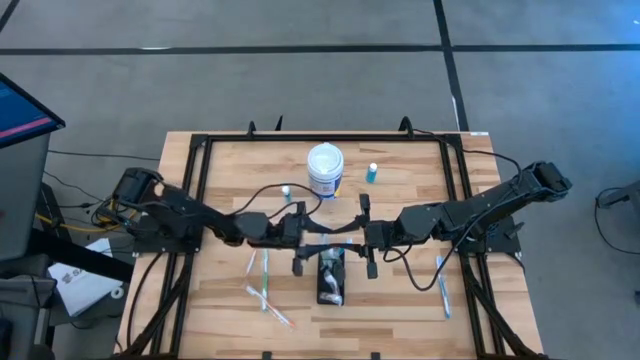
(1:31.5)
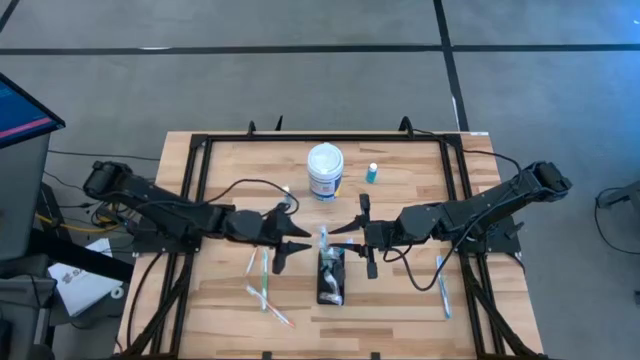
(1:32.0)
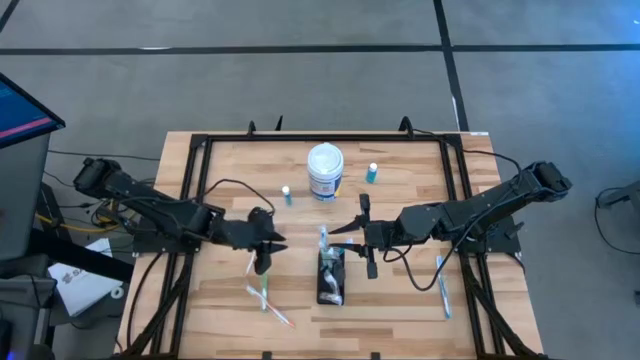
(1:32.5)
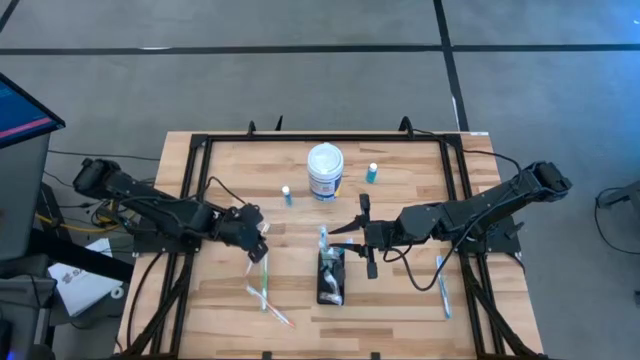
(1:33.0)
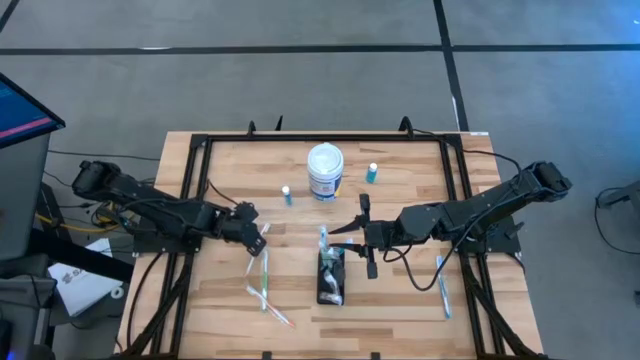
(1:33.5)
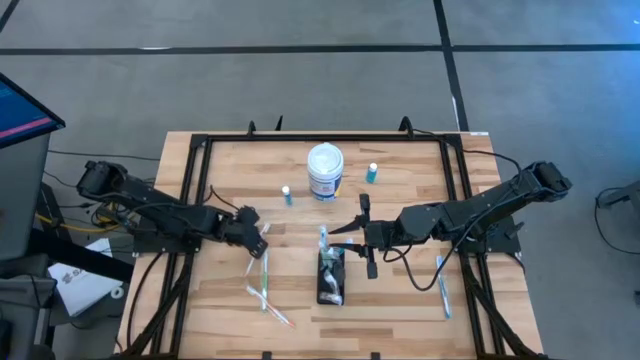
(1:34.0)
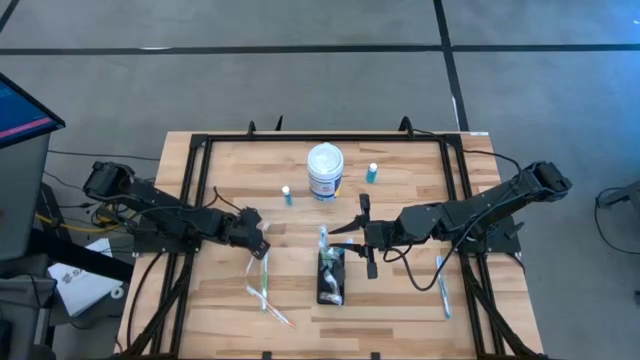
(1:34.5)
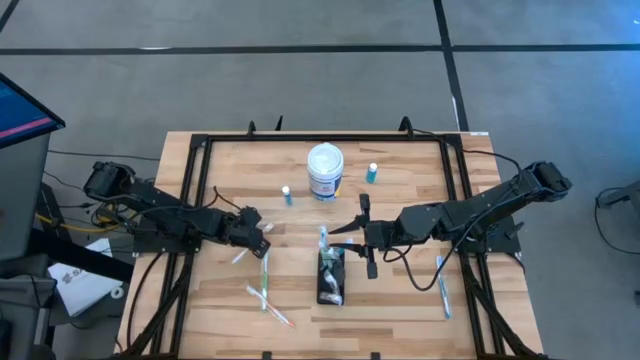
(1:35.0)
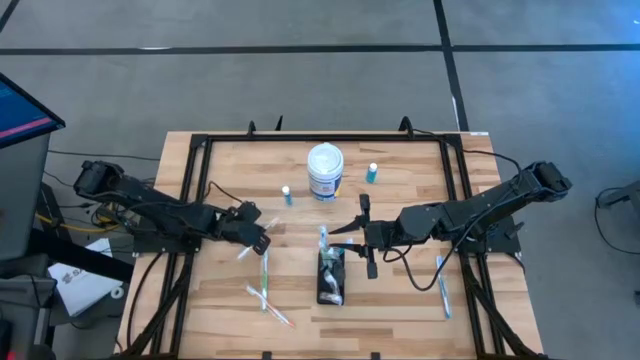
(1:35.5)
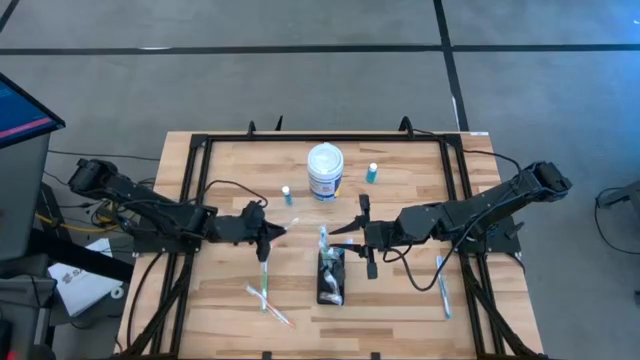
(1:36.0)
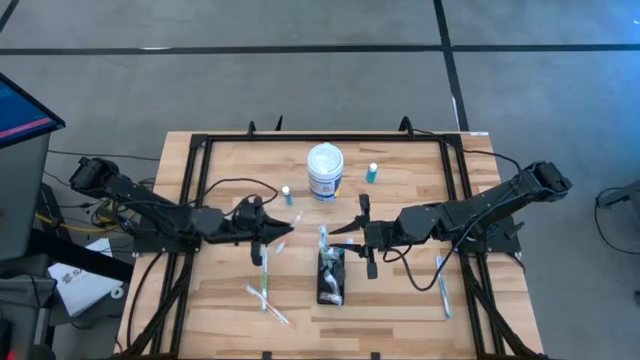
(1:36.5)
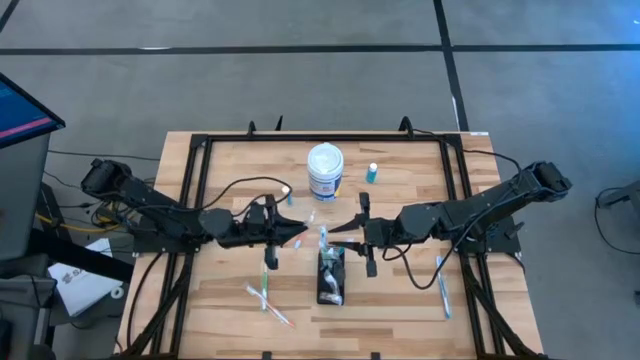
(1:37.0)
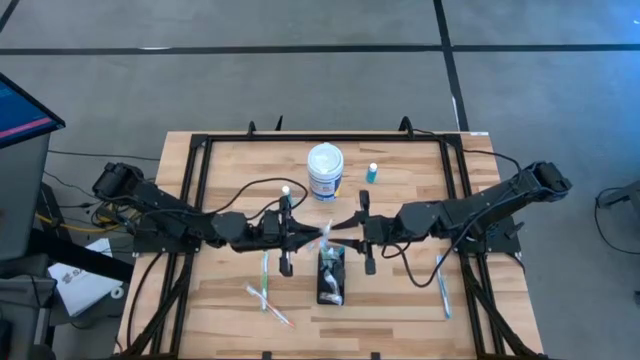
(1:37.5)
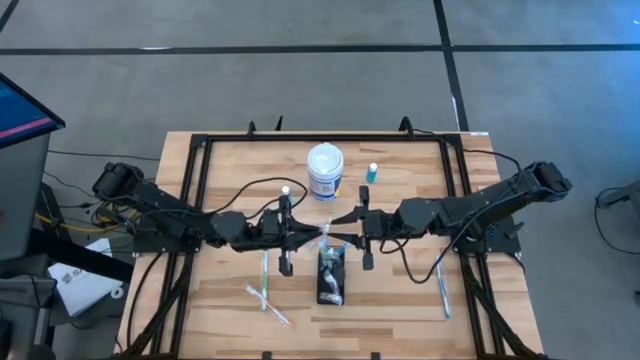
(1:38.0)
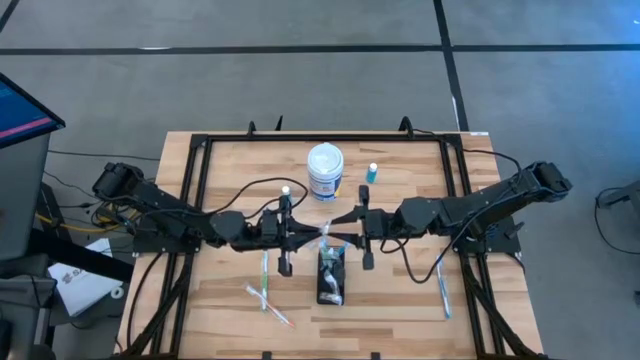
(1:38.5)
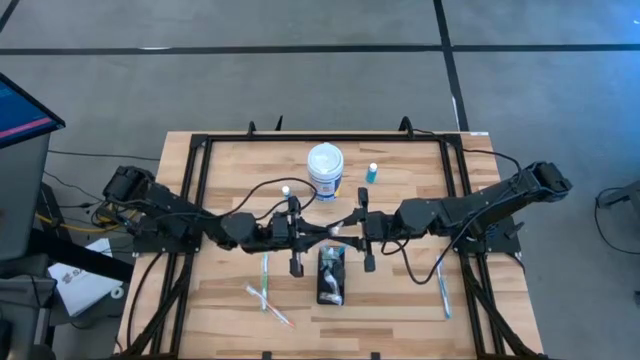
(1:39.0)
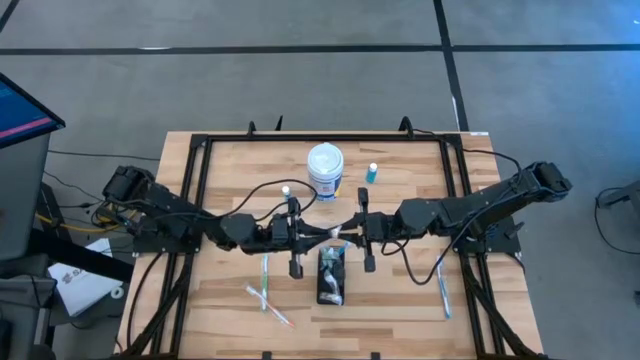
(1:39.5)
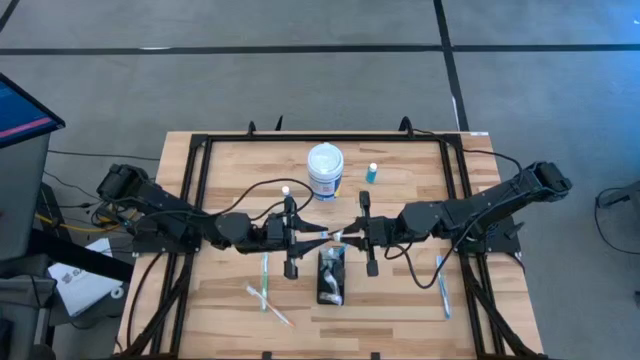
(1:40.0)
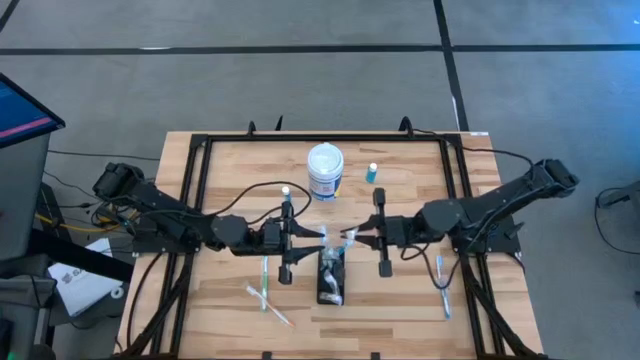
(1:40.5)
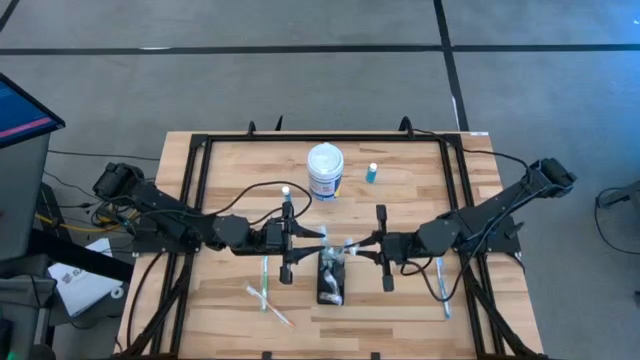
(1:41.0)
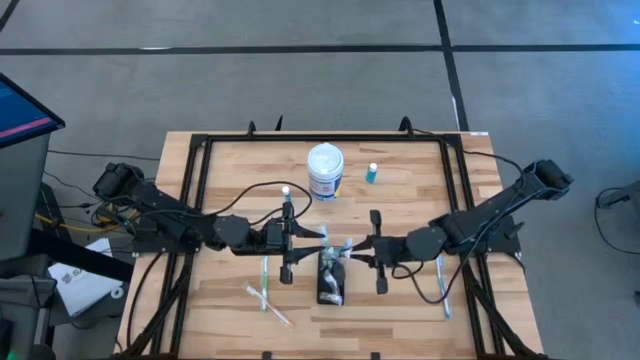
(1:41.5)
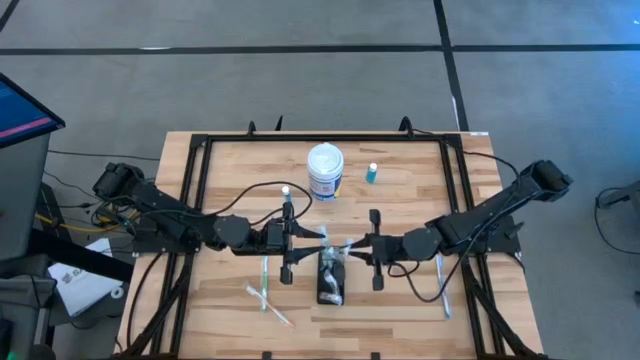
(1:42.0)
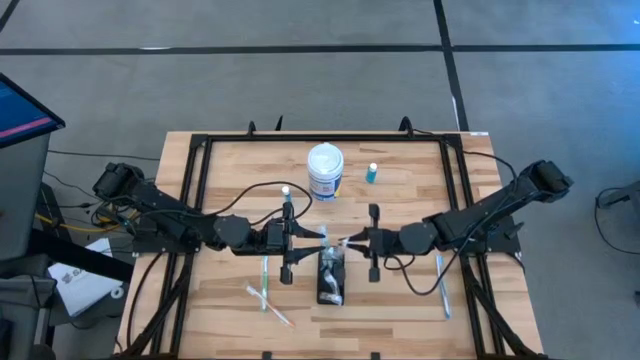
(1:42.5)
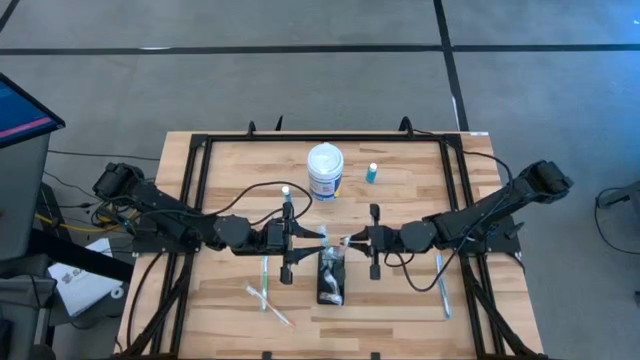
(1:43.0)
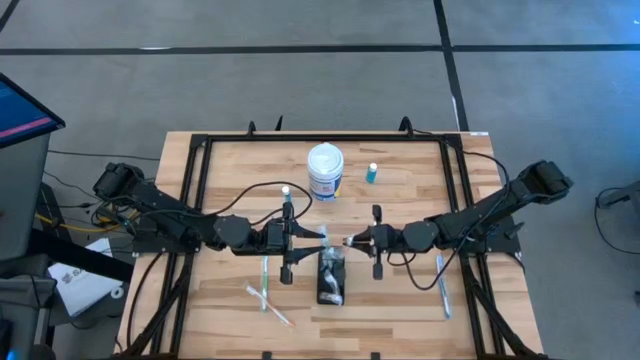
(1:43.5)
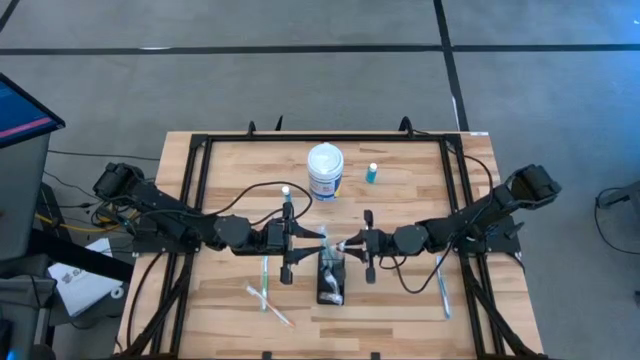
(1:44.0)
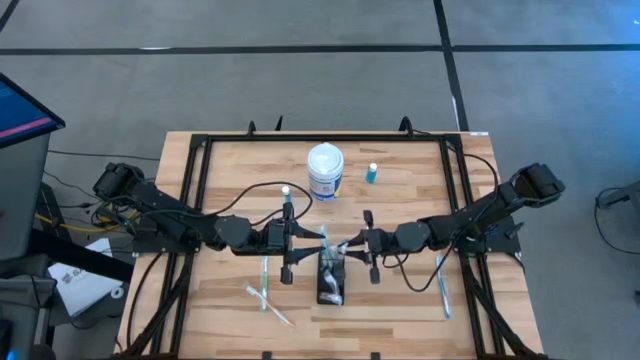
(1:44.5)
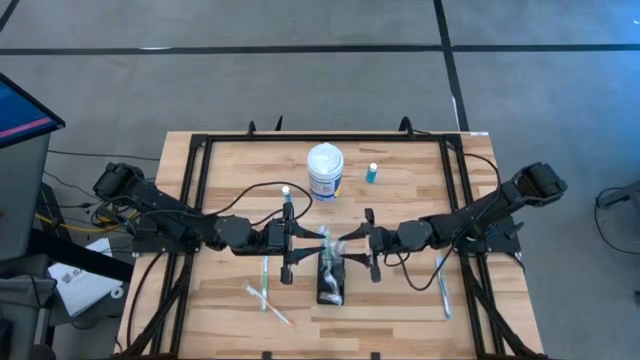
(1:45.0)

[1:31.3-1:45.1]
Task: Pick & Place toothbrushing station
Put the top orange toothbrush into the black mesh organizer

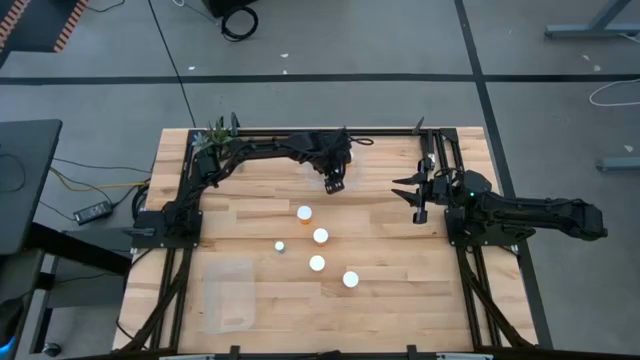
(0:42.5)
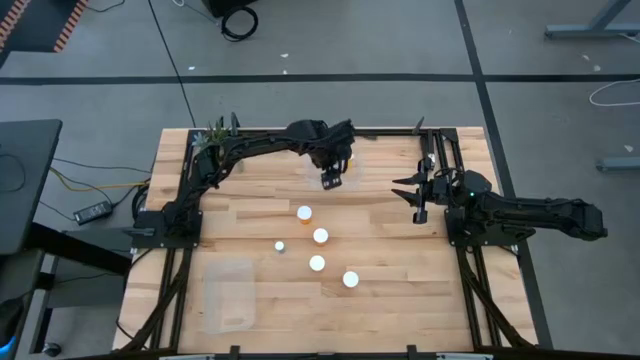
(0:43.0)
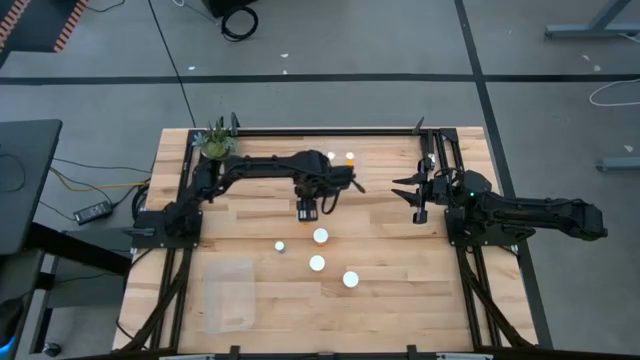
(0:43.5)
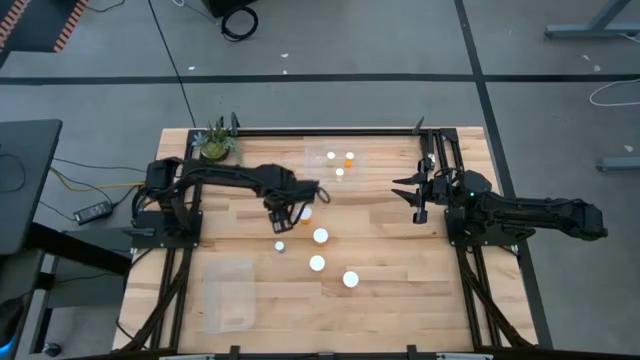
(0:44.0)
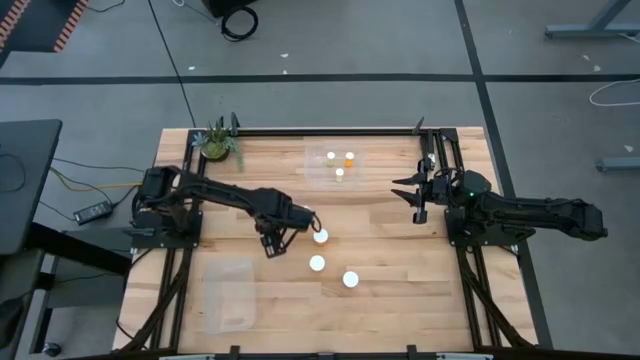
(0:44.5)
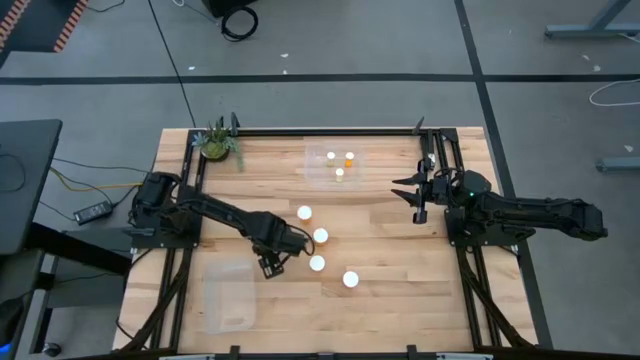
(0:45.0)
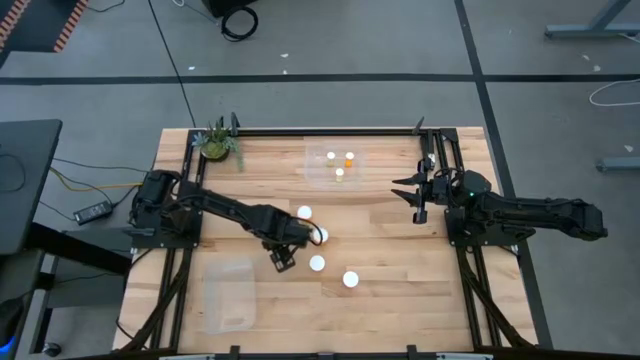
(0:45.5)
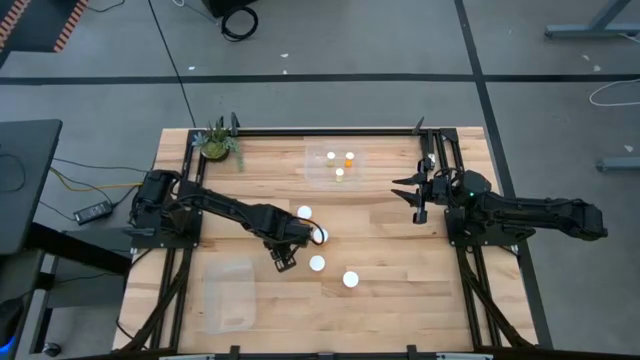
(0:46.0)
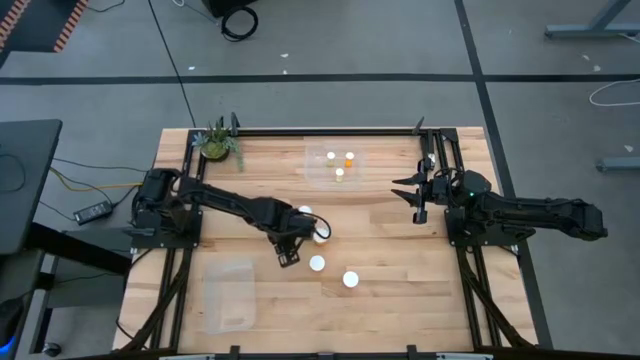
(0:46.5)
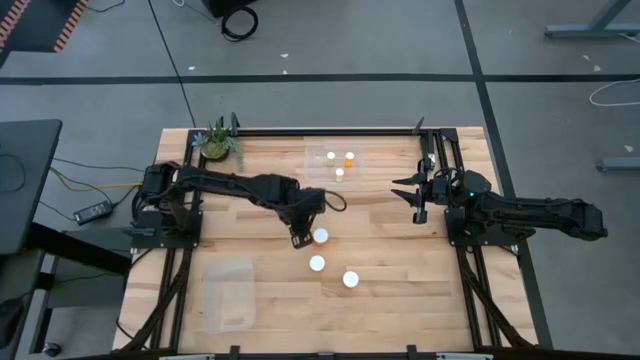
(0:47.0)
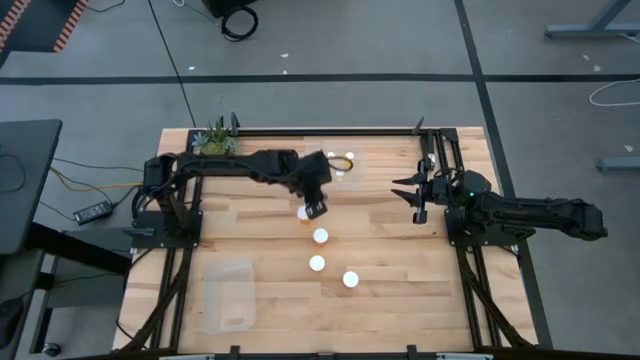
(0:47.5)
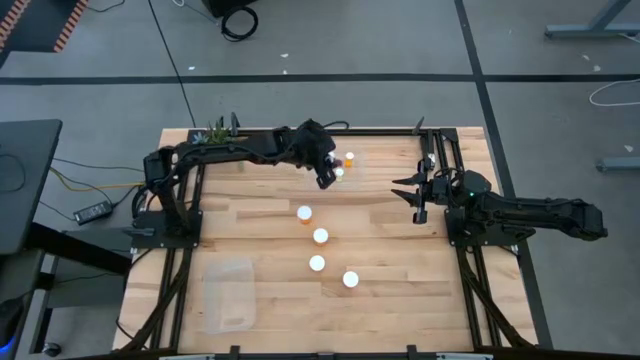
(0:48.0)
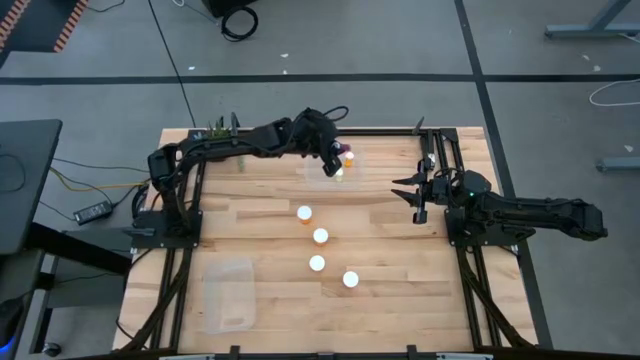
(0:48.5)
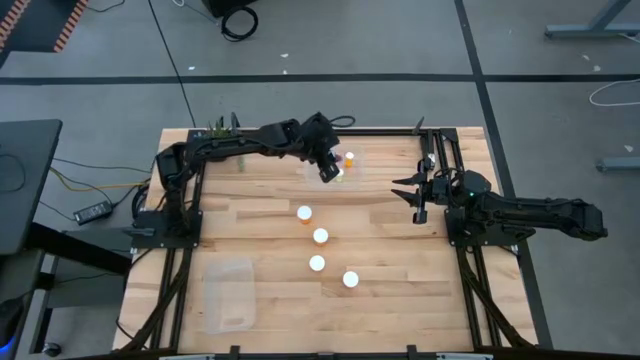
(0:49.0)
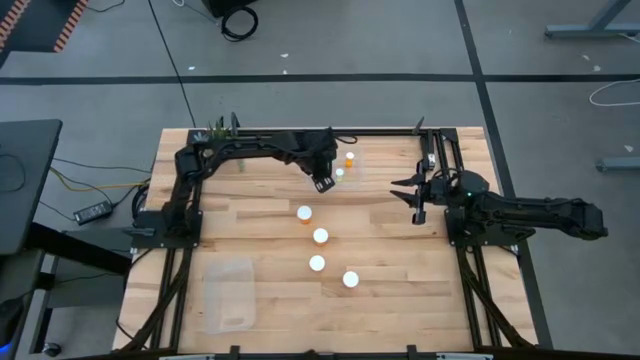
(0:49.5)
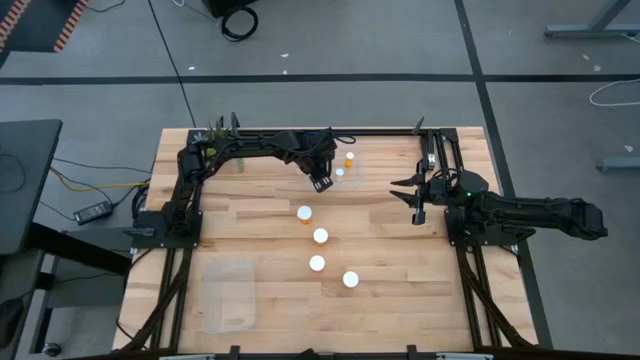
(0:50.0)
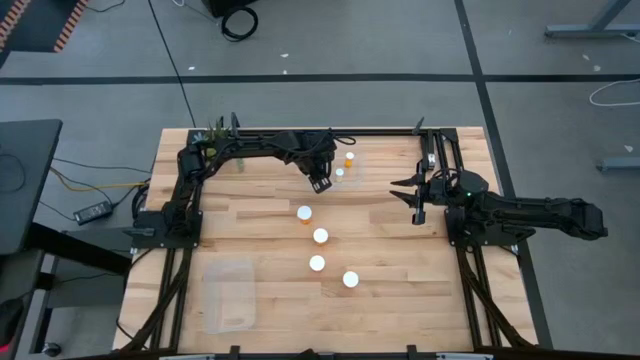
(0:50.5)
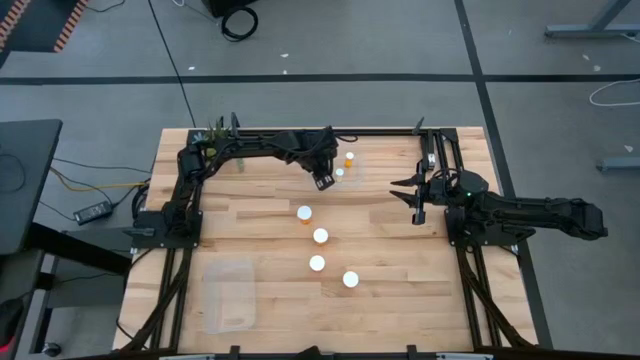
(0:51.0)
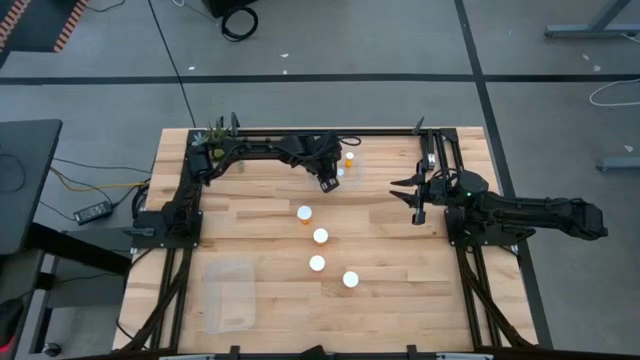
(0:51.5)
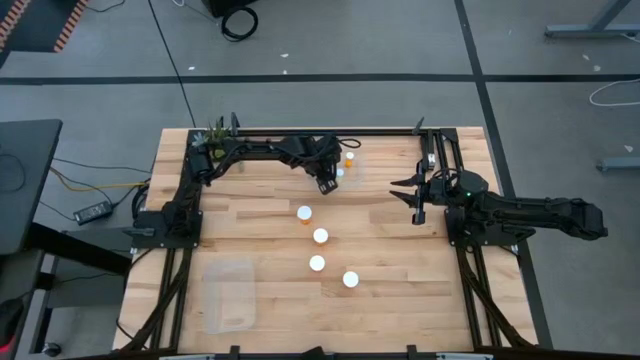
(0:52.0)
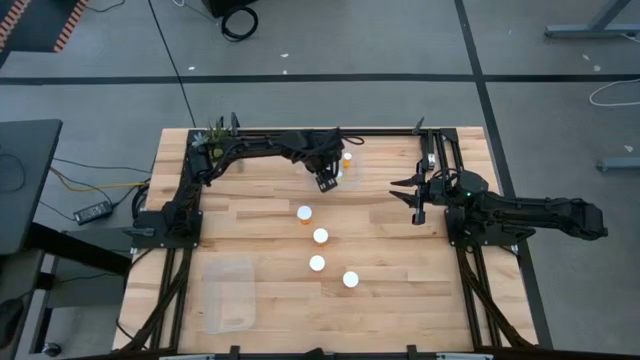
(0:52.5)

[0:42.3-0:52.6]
Task: Pick and place medicine bottles into bin by pill shape (circle, oval)
Put the blue capsule bottle into the top transparent bin
